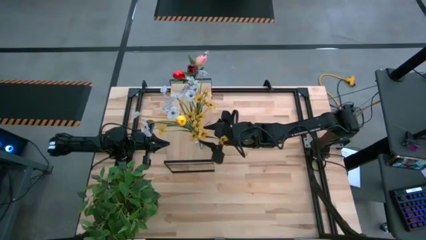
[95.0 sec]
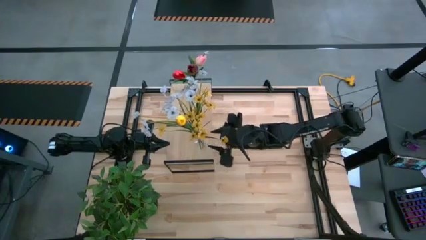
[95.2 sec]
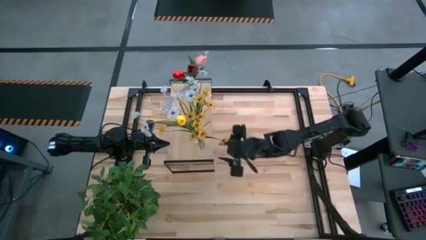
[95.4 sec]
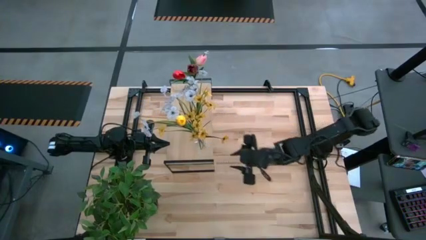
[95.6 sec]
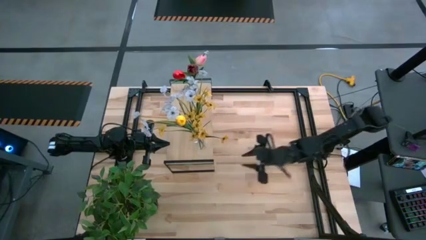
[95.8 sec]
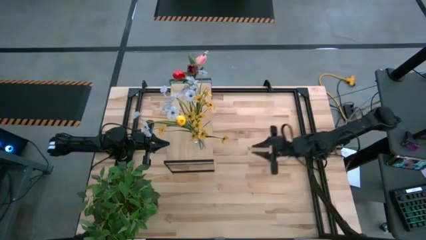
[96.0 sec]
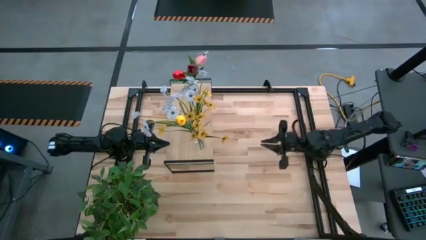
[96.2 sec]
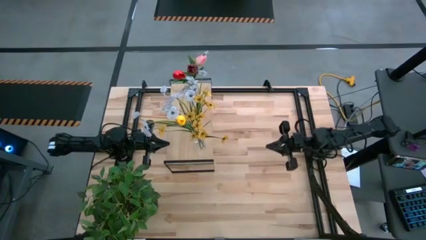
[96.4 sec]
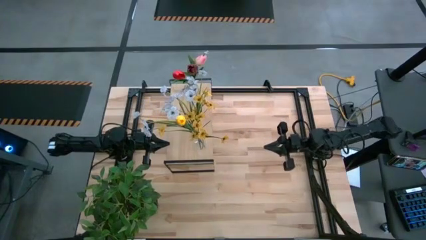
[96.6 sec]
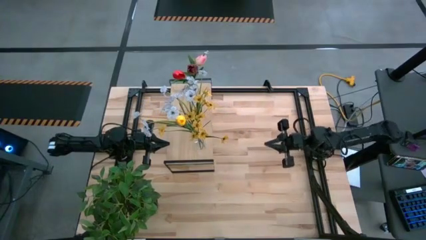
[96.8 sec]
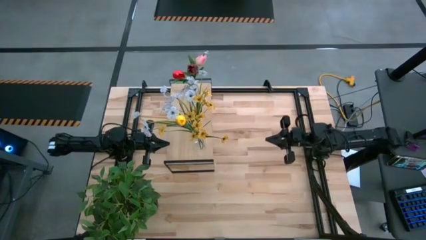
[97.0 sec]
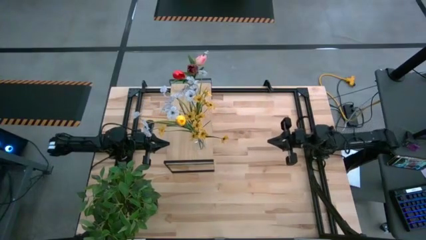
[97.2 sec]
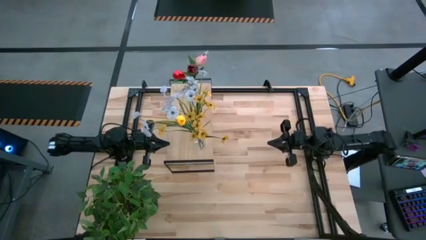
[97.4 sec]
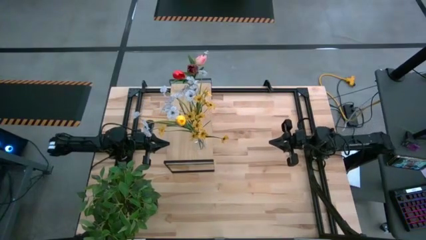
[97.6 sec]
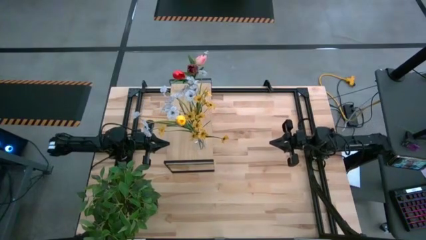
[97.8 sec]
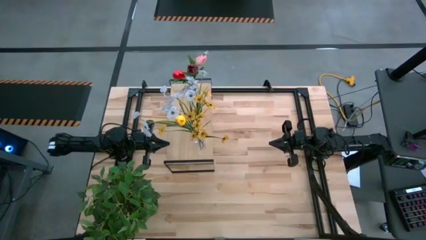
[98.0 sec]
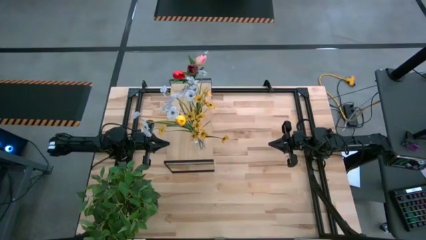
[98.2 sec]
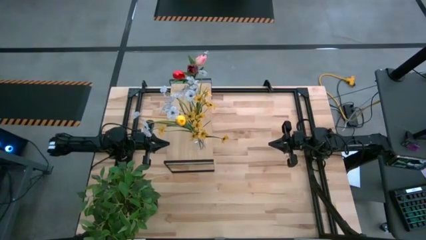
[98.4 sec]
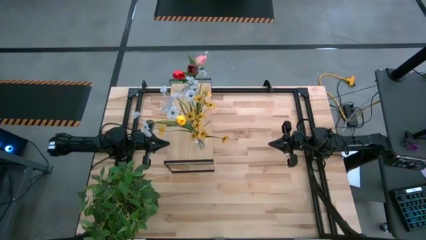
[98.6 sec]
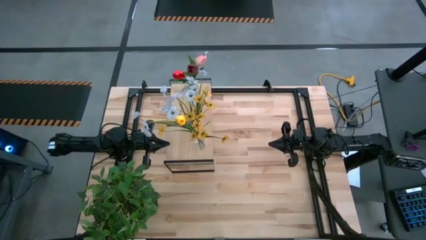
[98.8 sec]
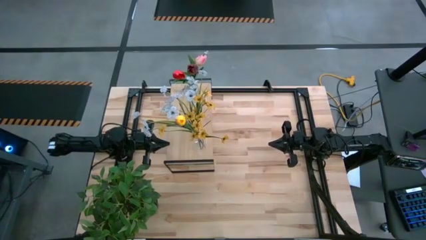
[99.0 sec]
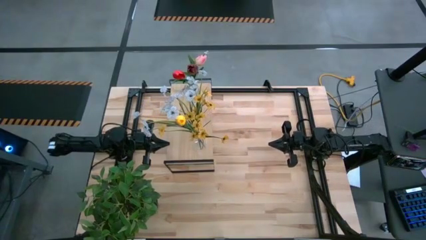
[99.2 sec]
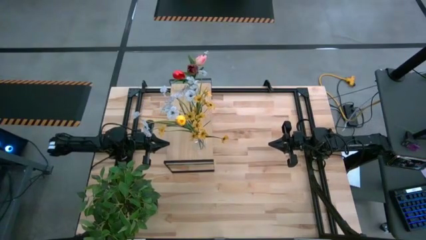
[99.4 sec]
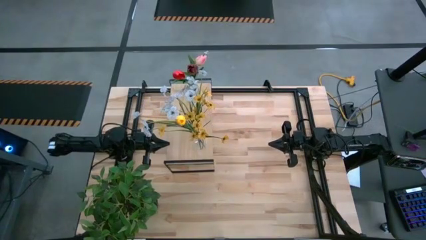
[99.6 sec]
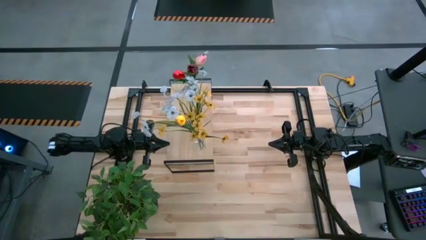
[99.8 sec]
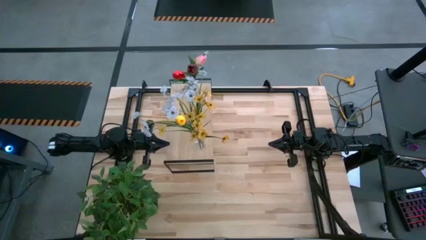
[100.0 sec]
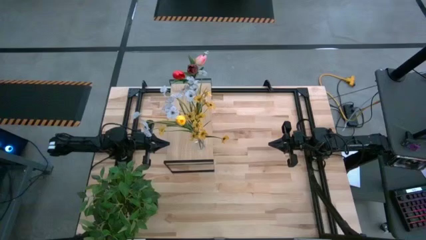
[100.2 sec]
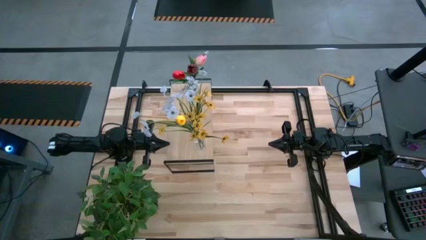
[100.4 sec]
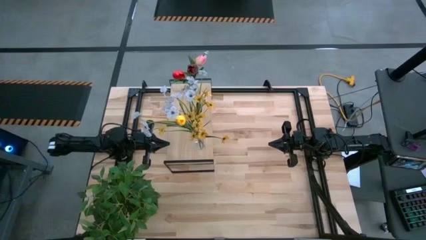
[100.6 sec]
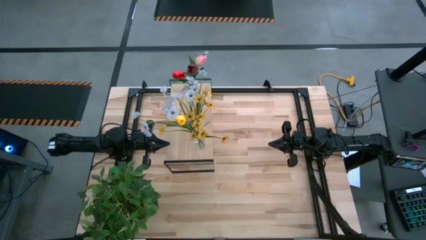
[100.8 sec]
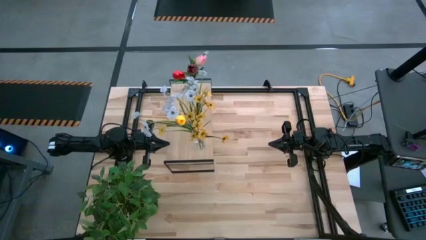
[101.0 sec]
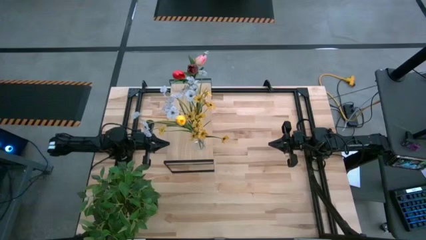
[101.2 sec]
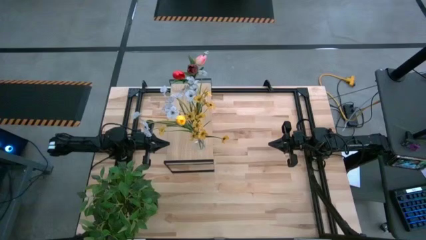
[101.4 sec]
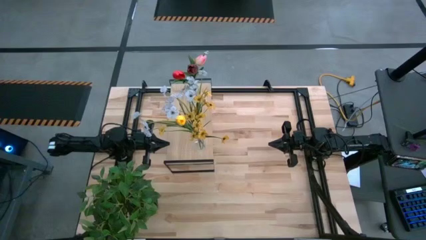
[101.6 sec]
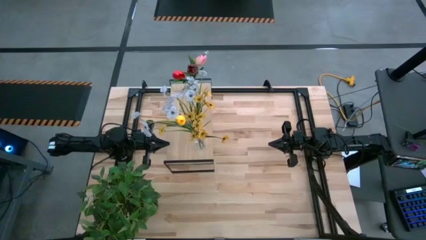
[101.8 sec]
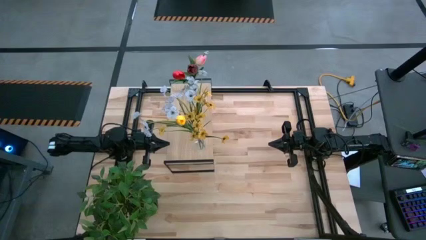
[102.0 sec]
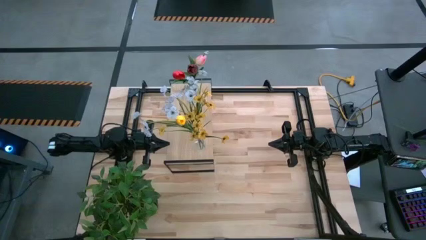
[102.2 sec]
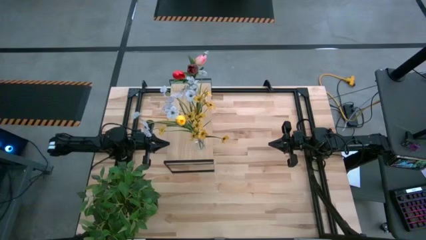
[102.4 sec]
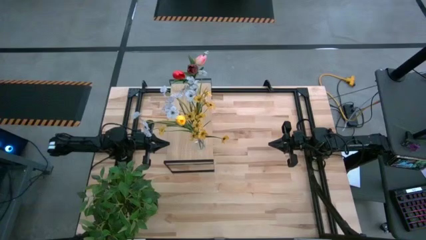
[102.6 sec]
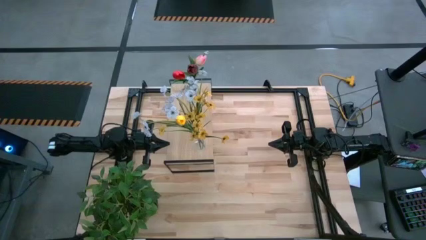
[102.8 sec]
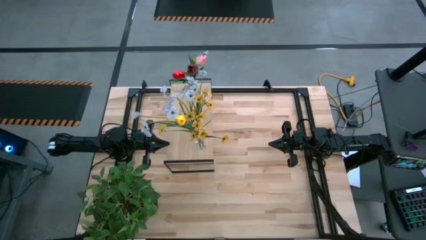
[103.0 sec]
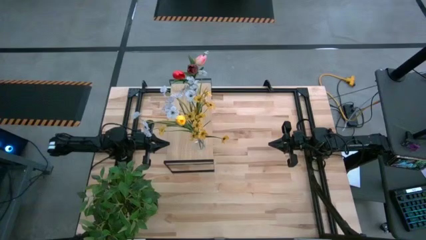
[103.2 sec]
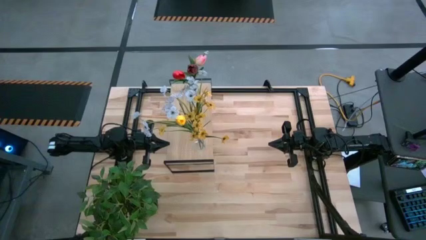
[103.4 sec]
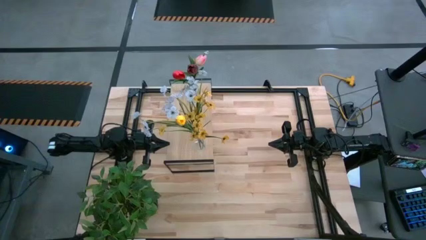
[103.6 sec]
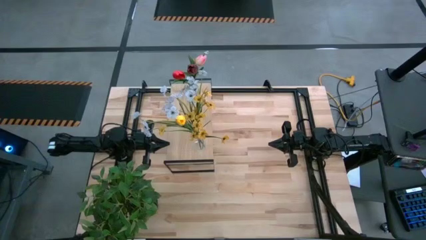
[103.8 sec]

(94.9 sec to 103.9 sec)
Task: Pick and place flowers into a vace then onto a shelf
Return to Home Position

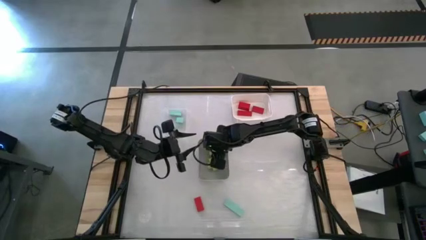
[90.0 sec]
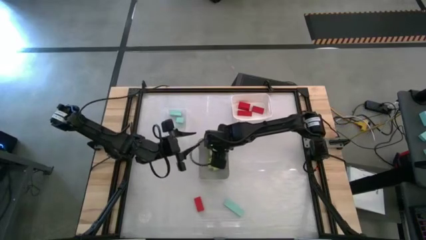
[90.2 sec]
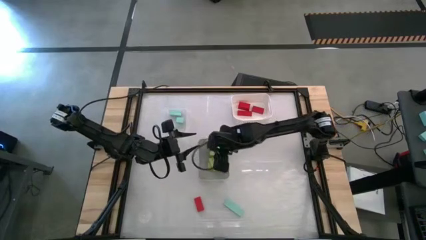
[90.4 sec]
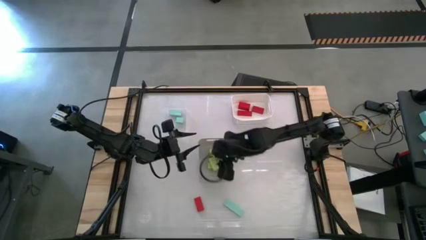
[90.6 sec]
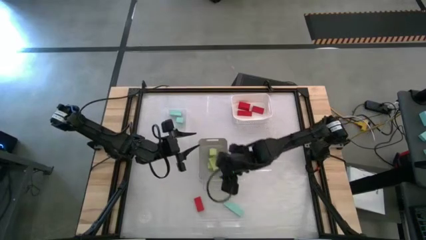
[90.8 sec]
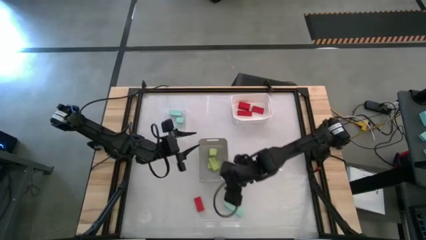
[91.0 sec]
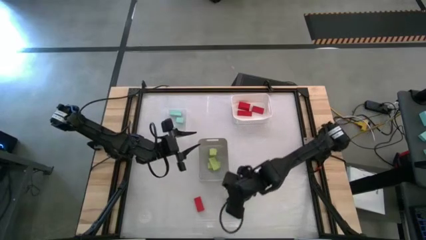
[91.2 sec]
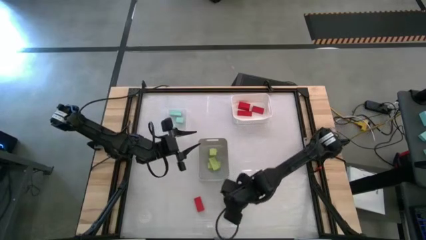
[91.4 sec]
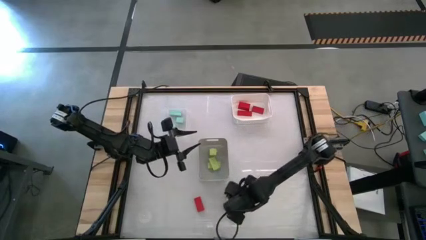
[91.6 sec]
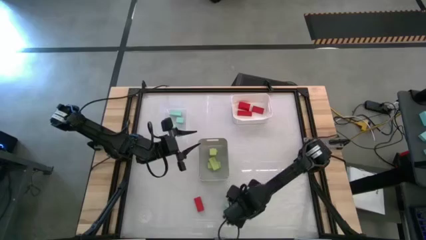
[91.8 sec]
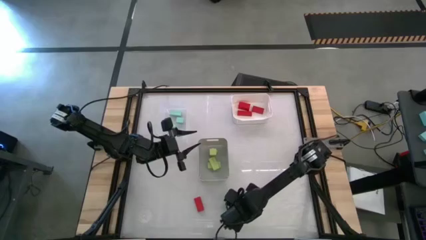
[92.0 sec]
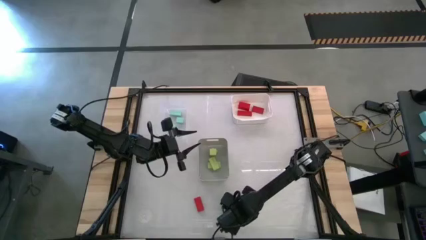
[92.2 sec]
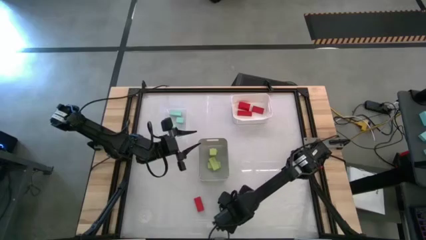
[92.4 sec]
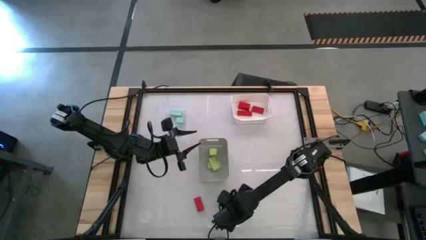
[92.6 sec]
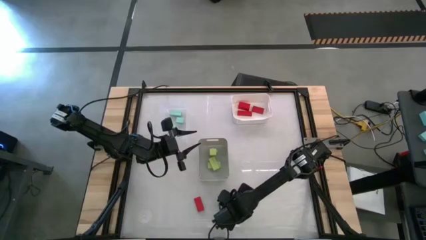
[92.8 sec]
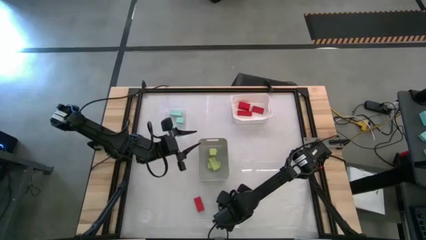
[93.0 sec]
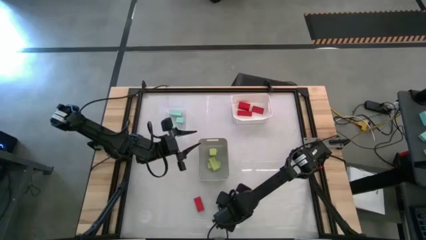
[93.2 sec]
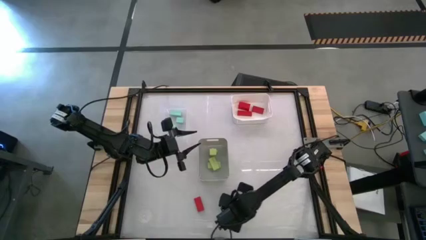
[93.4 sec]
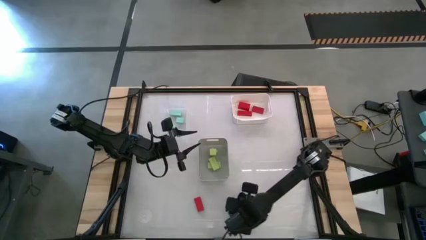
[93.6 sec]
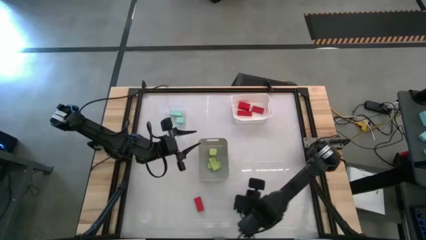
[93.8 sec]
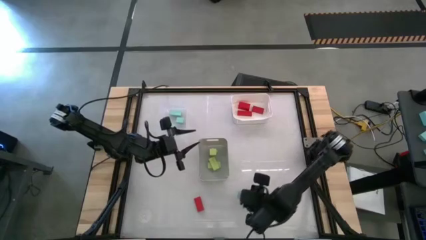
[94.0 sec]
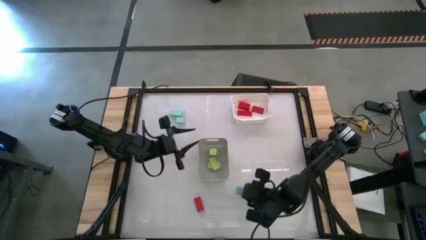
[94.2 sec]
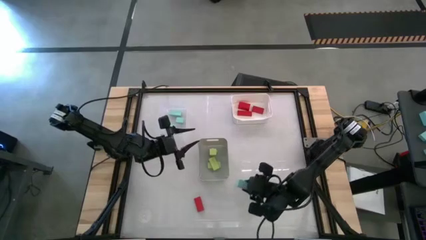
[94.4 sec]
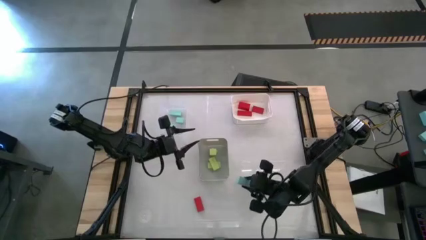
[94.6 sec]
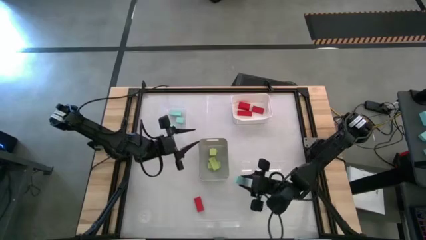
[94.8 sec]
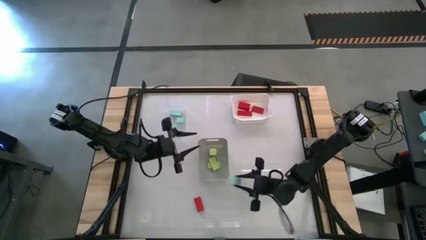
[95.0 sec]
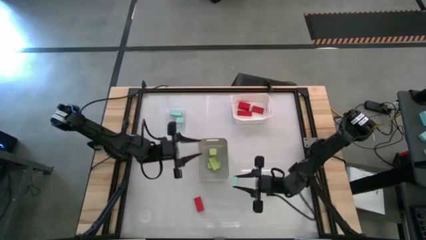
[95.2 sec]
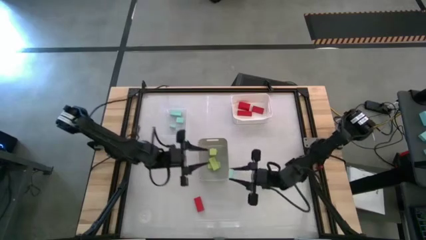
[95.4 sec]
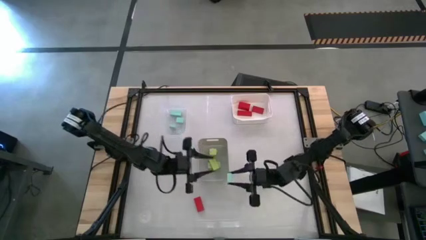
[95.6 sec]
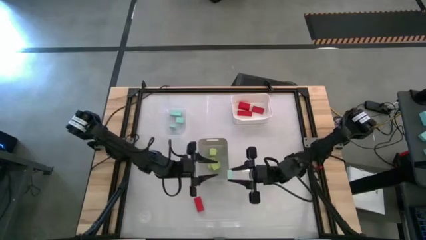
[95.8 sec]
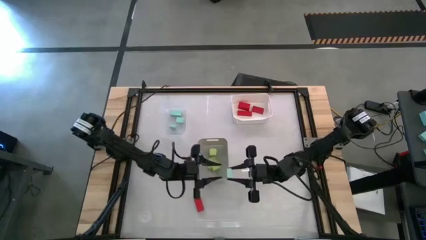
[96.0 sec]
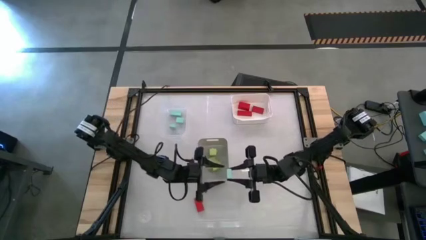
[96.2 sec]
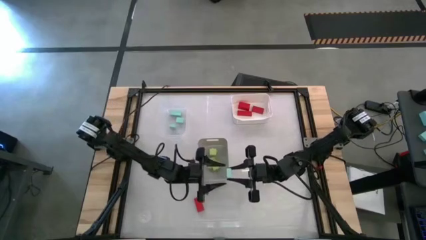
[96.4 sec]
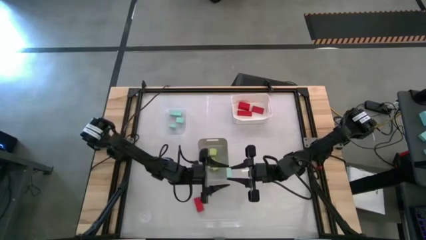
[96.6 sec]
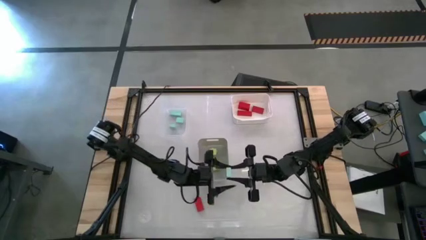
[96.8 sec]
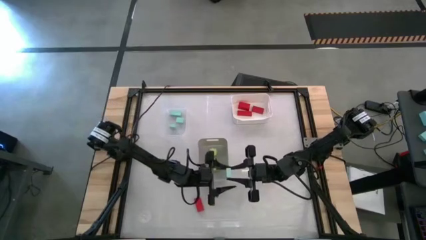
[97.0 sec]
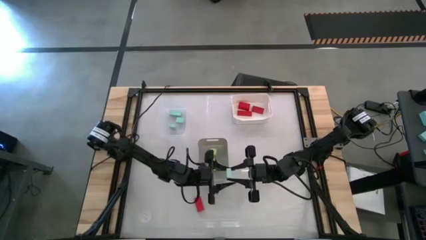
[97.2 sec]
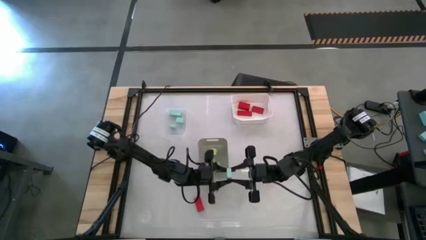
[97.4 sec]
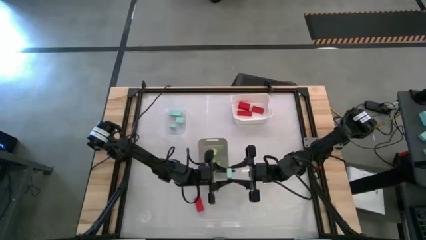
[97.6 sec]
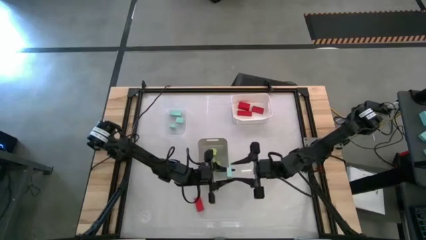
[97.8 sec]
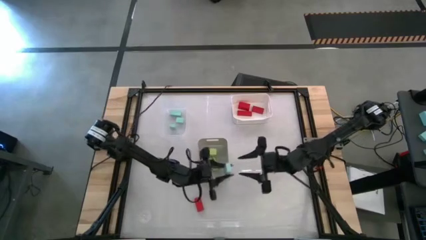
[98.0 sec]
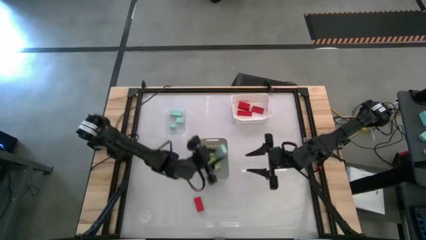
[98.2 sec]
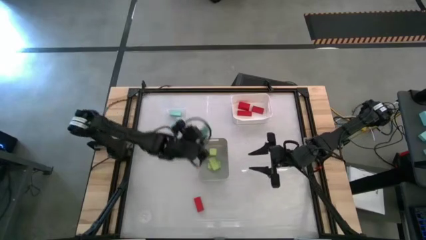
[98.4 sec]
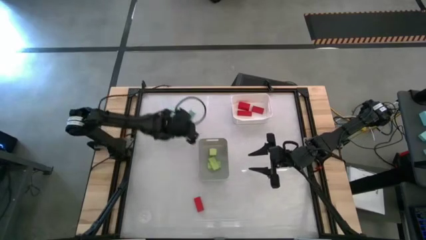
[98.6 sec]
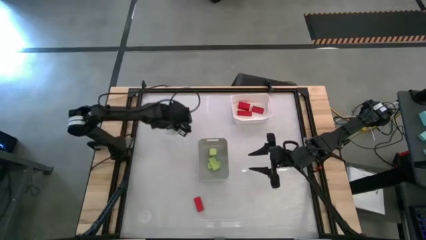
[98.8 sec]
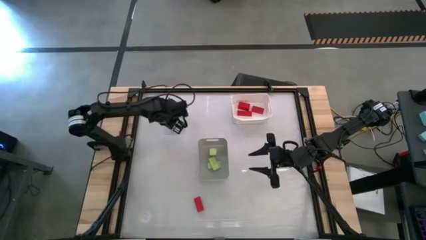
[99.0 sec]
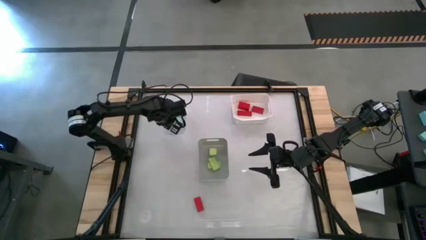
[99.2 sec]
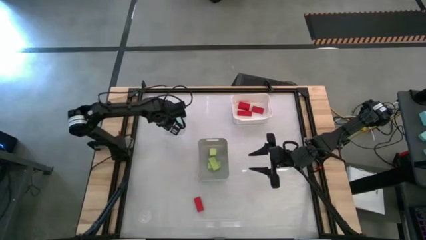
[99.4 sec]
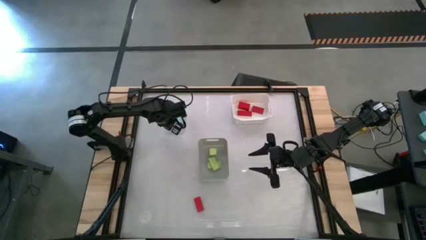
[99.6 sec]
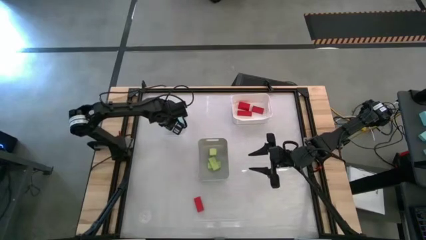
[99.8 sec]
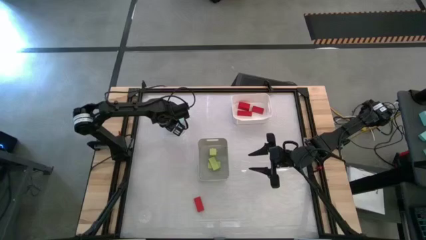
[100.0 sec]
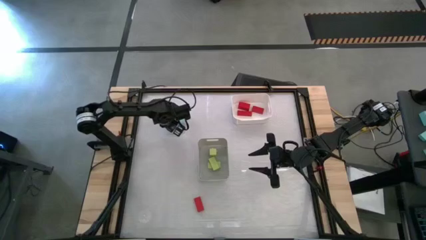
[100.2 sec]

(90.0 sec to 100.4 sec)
Task: Sort & place blocks by color
Put the blue block into the transparent bin
